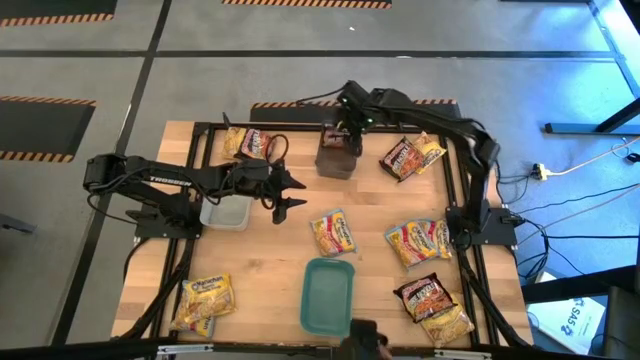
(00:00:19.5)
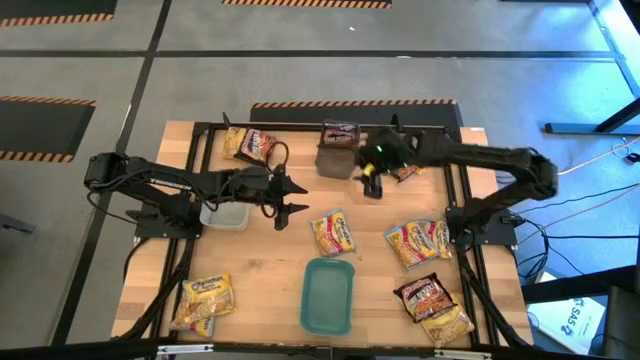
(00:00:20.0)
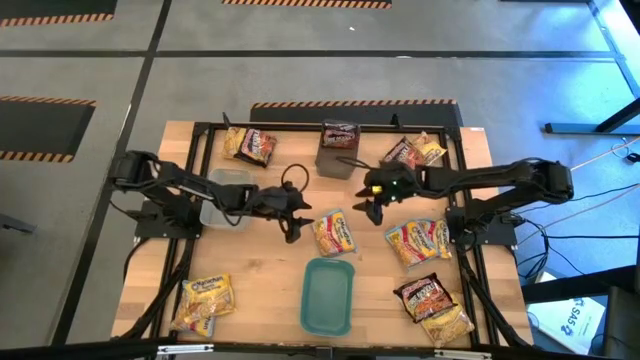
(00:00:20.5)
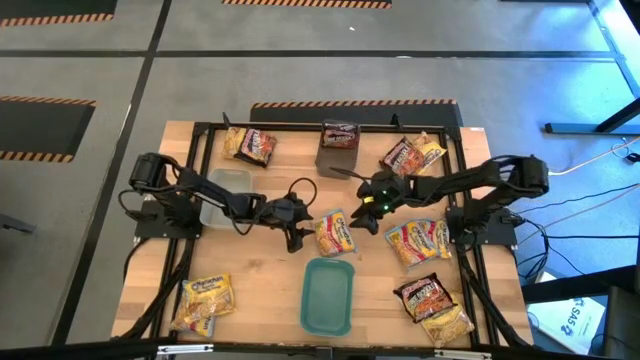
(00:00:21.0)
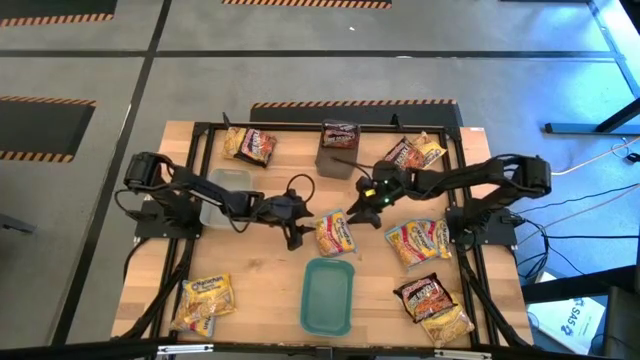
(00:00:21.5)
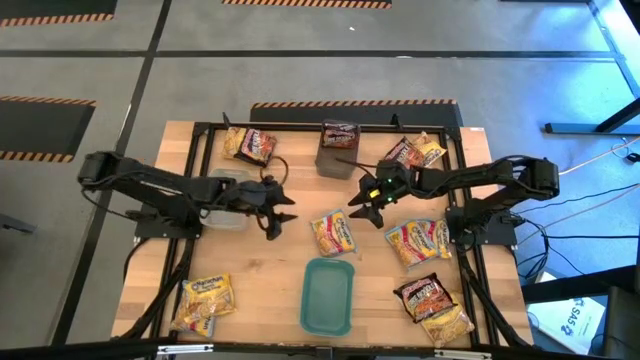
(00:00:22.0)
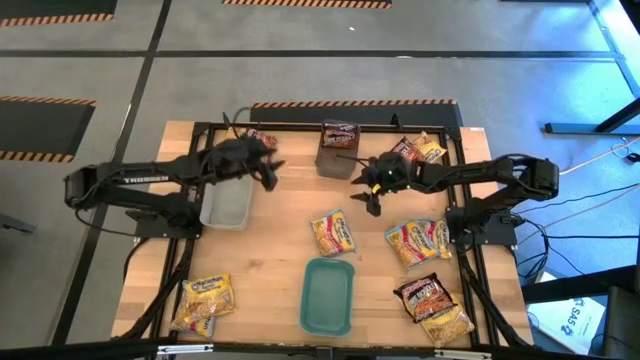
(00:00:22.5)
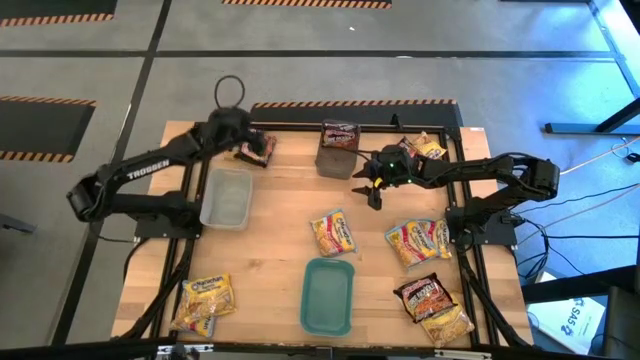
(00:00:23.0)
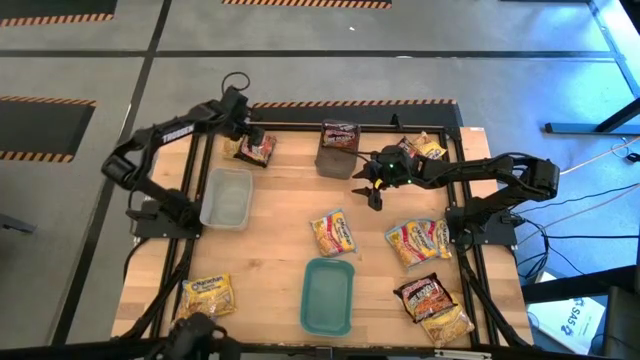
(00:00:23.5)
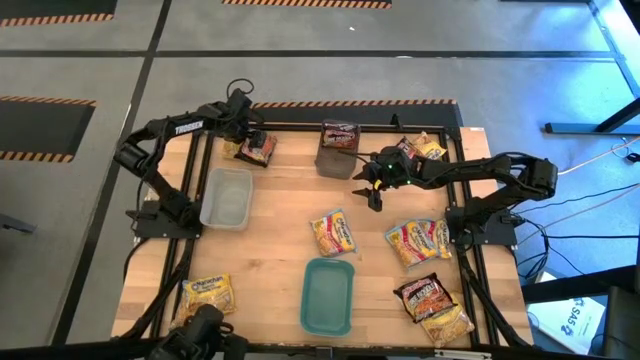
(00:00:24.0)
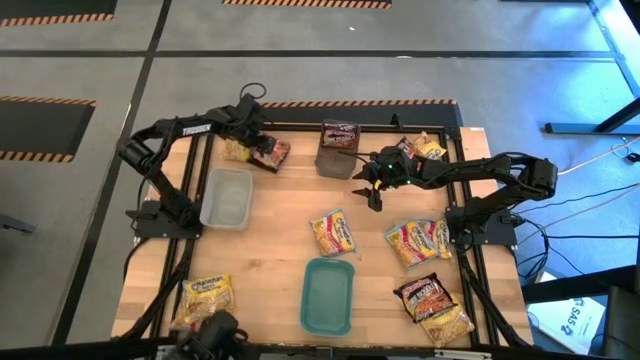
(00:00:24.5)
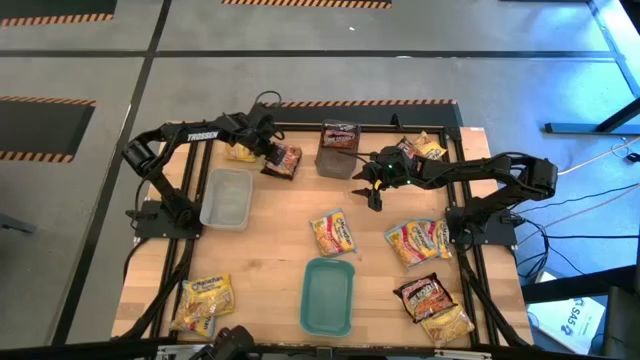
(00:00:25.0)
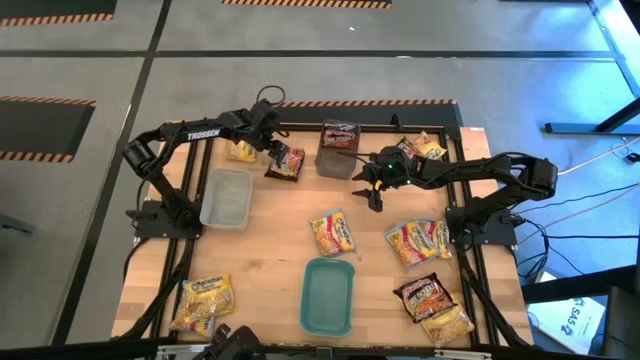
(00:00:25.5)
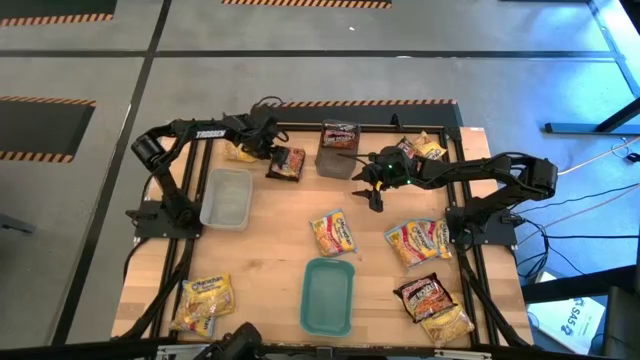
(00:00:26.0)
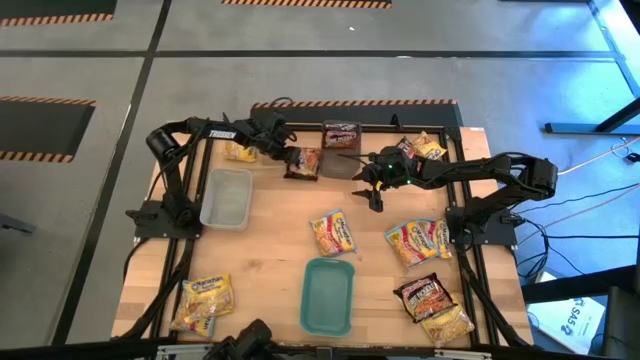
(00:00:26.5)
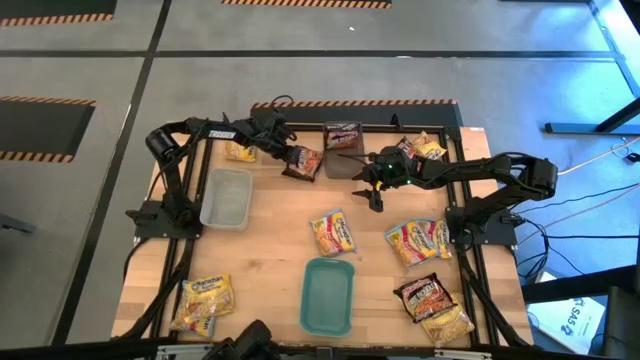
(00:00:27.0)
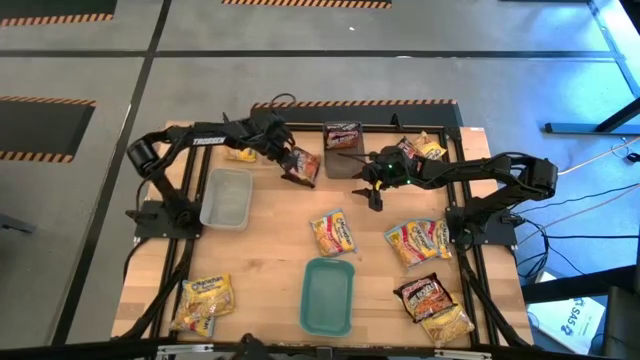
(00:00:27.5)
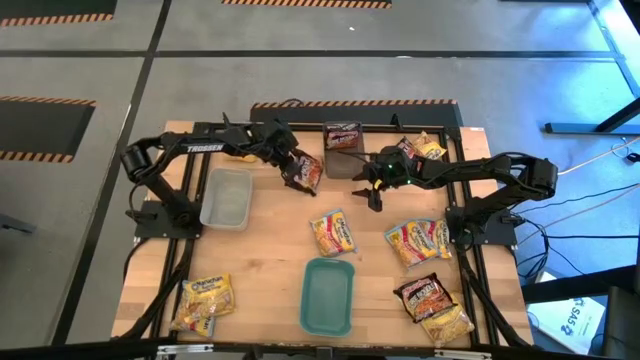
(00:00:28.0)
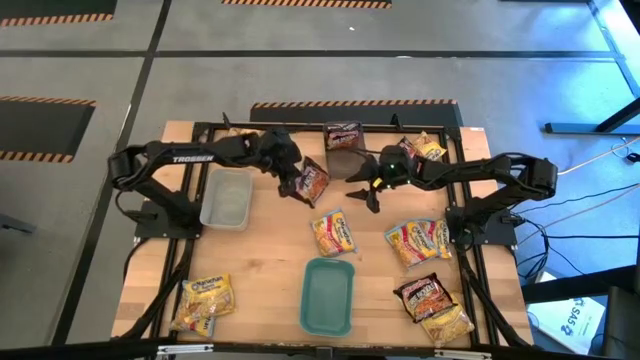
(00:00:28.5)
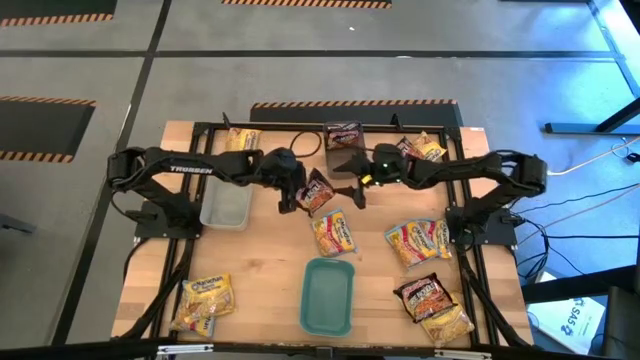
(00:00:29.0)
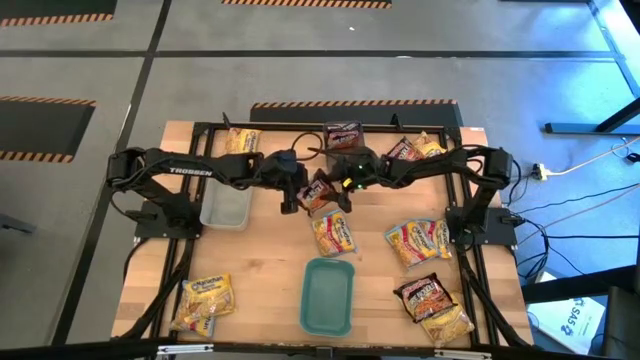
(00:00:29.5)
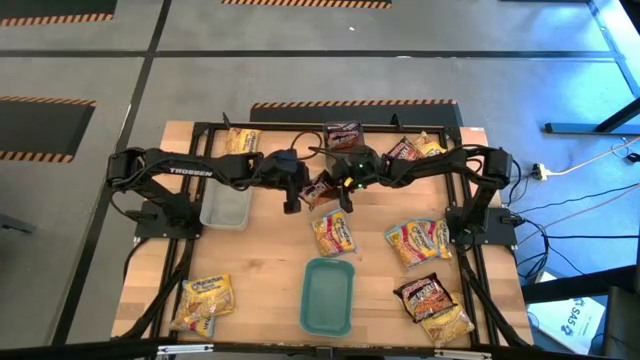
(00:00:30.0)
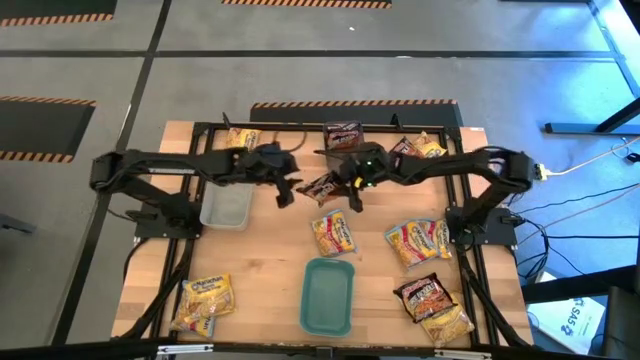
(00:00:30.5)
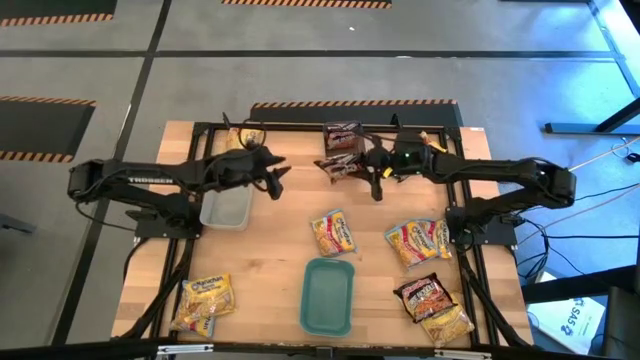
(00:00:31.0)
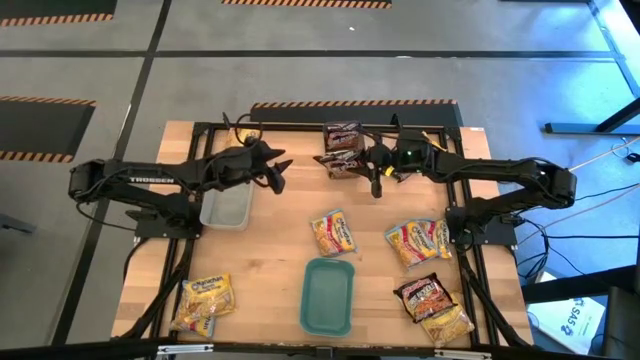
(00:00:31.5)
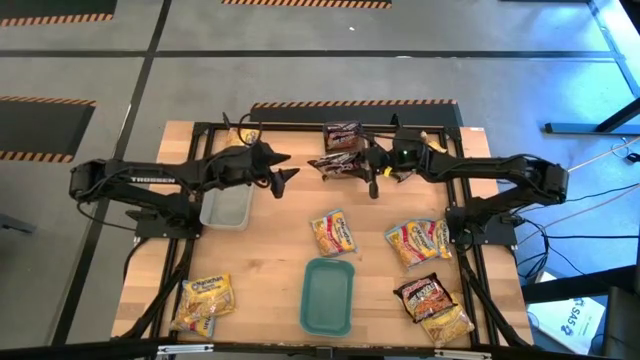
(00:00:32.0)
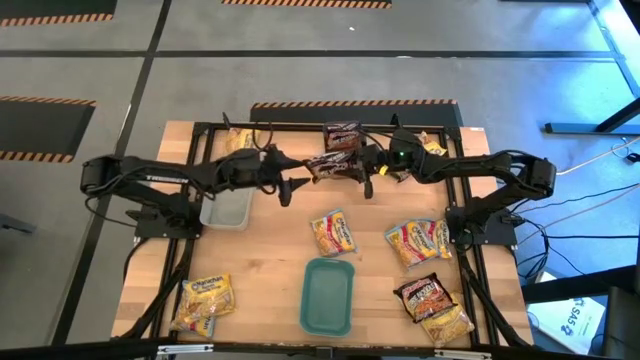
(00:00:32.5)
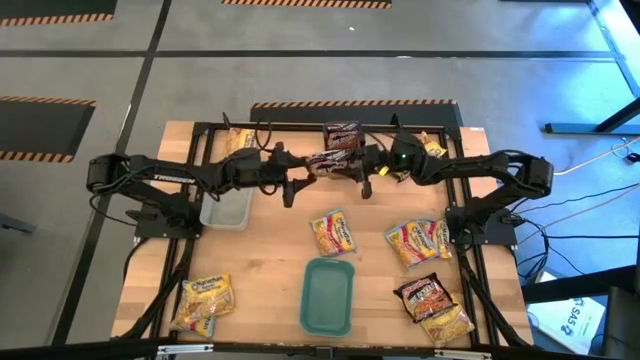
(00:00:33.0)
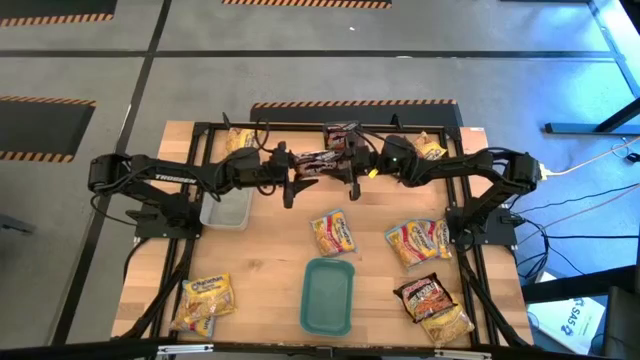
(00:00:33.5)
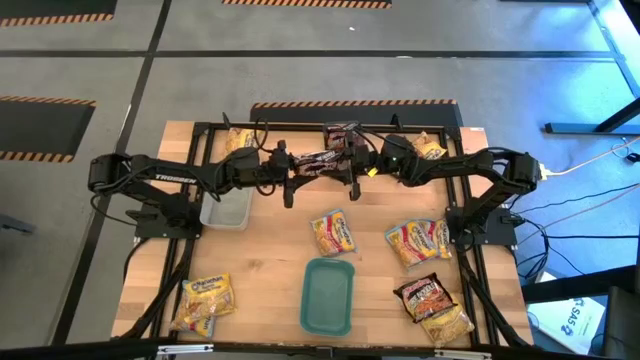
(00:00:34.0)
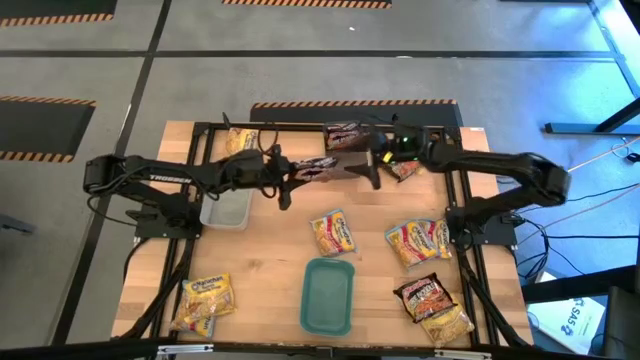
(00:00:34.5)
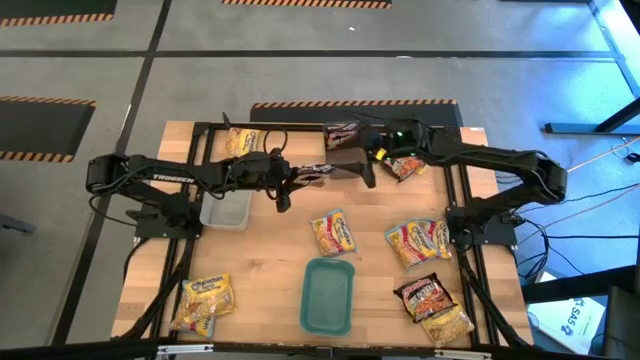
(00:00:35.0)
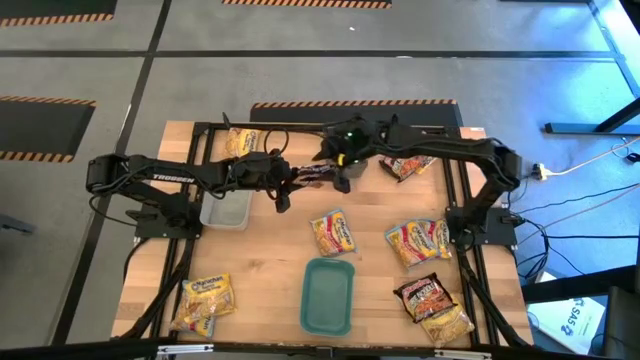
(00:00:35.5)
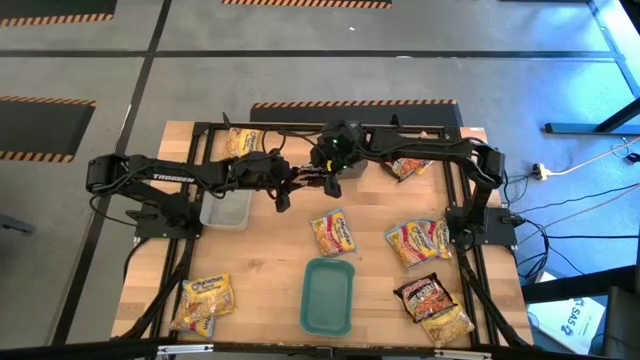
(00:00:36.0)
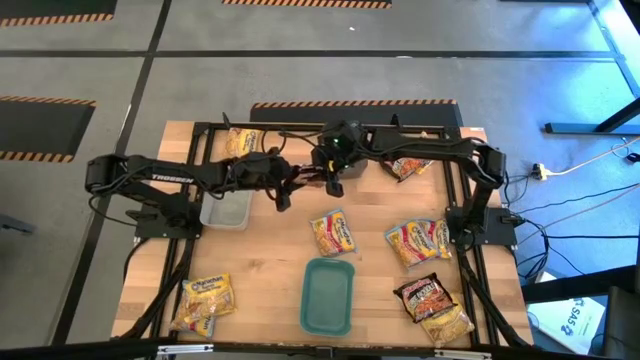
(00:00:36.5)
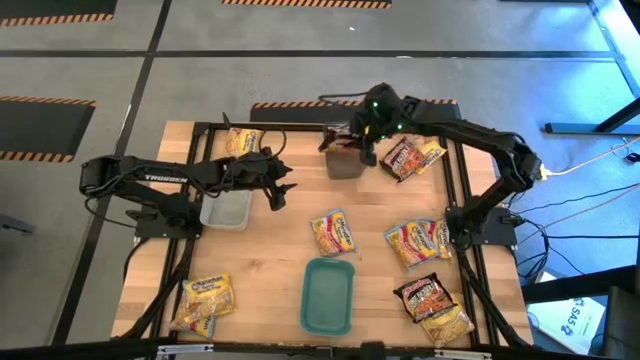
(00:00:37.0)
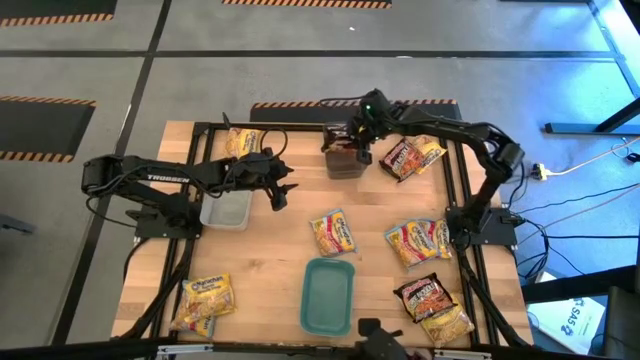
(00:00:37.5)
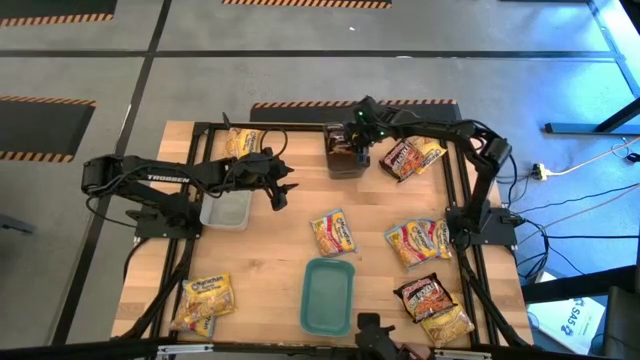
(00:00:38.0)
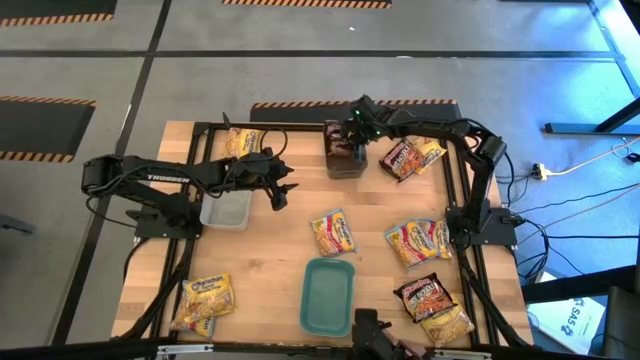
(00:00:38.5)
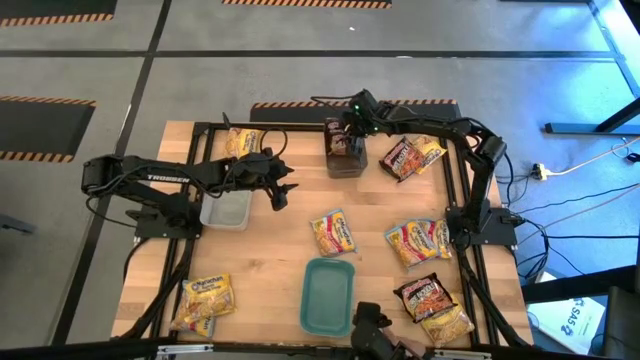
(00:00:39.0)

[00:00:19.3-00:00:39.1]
Task: Sort Maruchan noodles
Put the black noodle pack into the black bin
